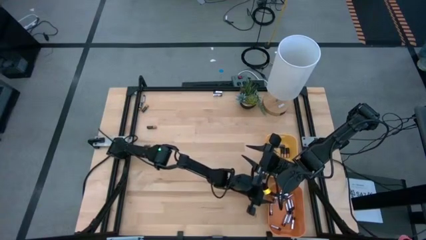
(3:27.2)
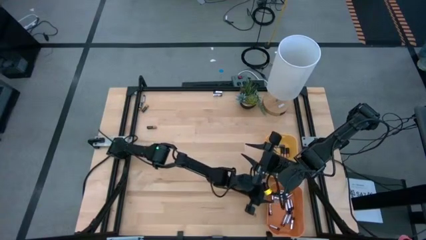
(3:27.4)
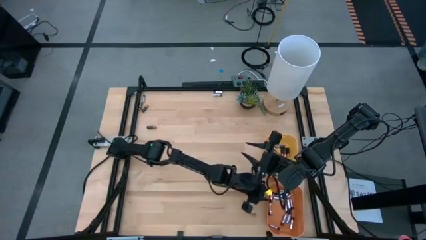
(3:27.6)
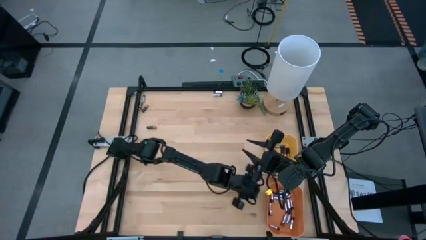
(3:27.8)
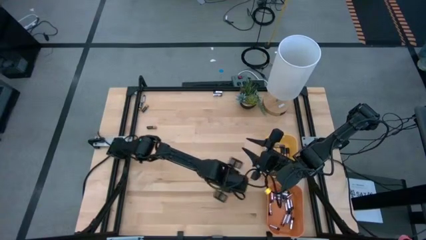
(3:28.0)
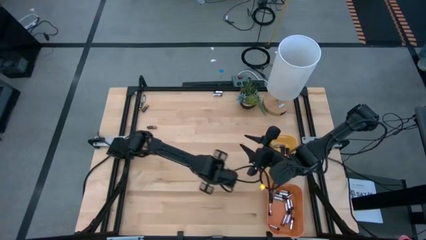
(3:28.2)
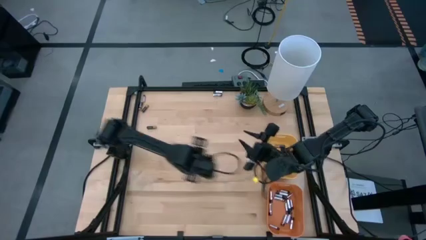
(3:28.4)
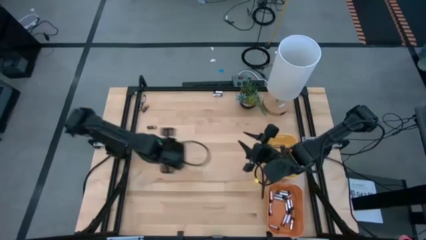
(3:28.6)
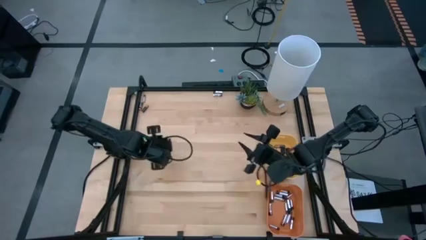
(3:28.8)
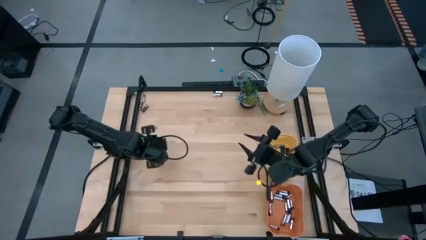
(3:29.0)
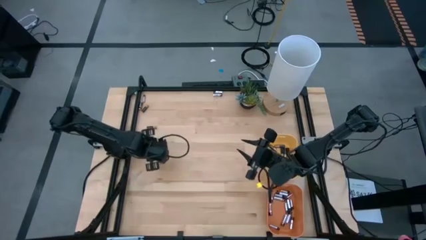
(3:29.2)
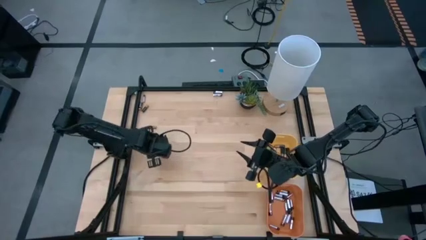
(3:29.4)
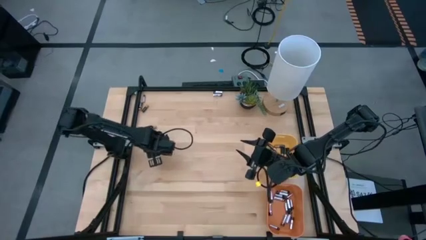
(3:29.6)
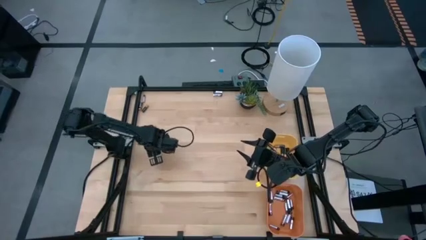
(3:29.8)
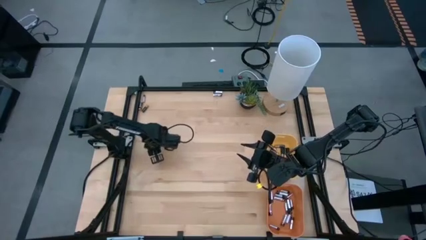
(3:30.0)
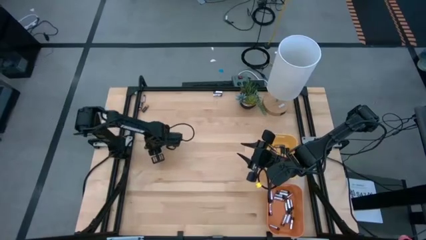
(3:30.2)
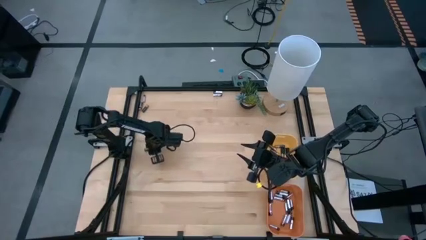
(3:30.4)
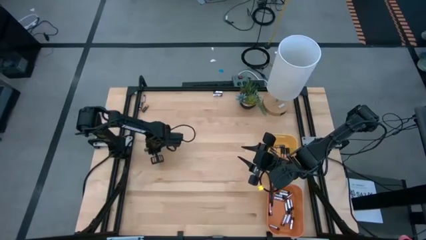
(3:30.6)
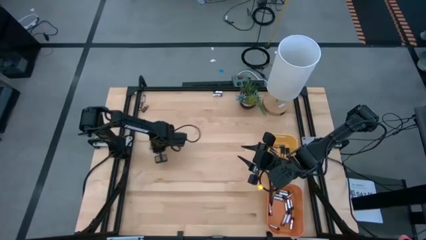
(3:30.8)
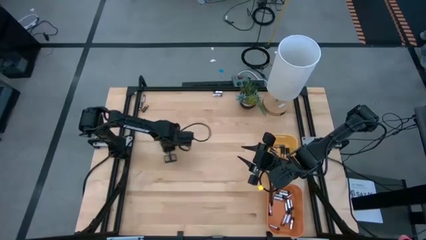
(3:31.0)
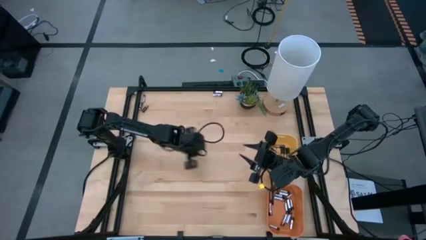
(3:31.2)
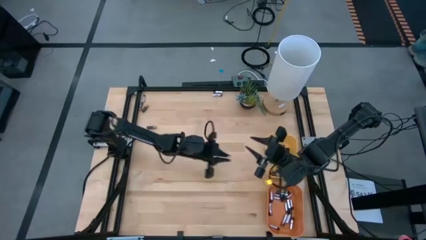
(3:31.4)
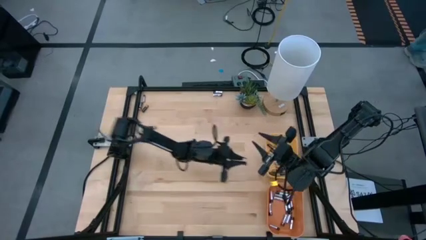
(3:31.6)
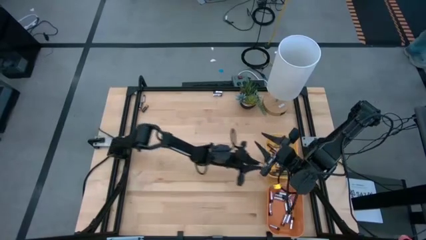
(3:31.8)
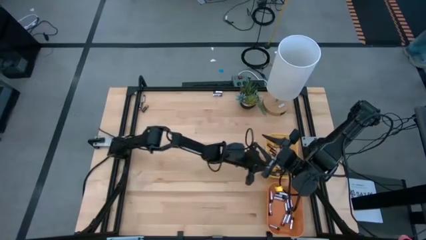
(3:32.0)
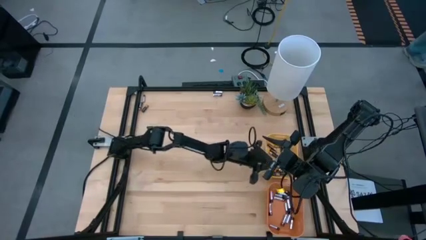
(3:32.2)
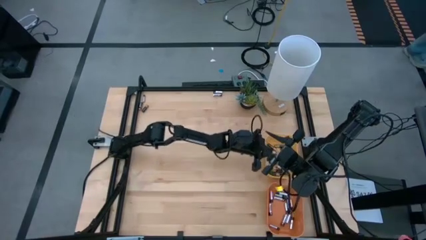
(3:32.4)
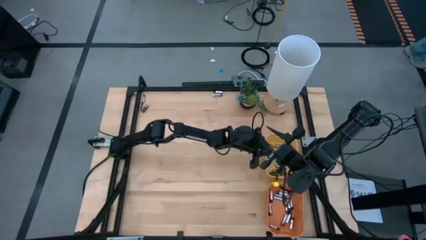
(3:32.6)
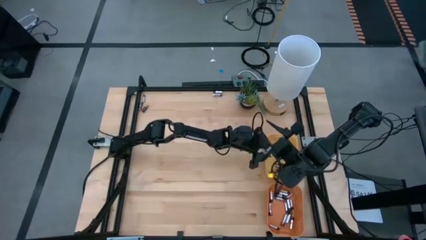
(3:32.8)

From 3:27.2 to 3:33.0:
Task: Sort batteries
Put the brown battery into the yellow bin

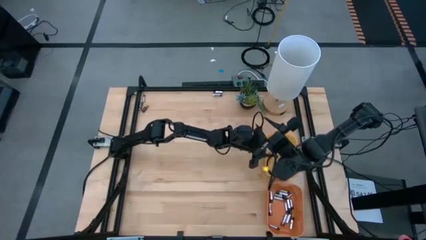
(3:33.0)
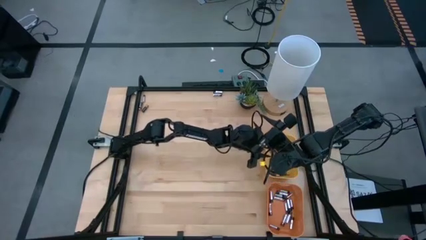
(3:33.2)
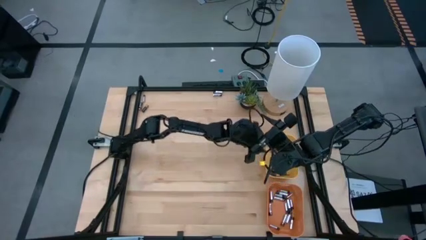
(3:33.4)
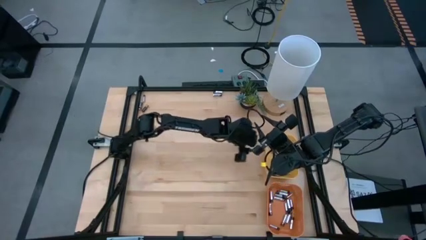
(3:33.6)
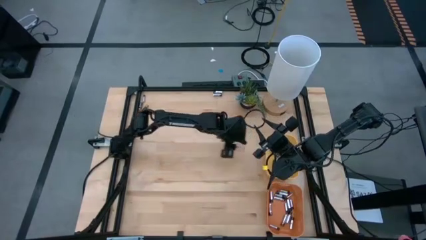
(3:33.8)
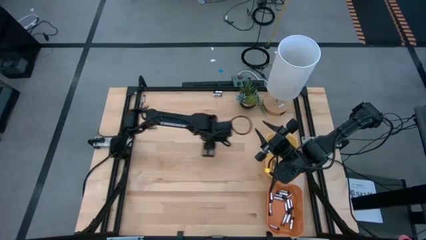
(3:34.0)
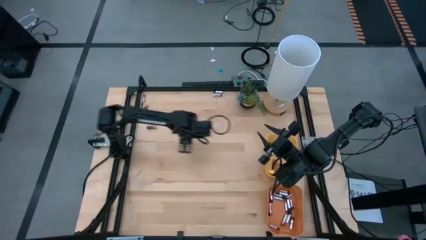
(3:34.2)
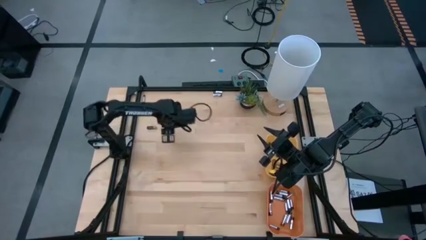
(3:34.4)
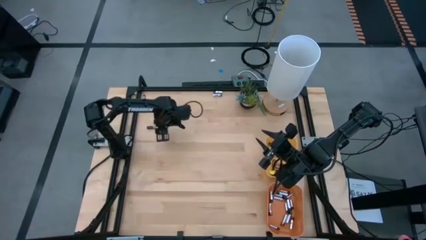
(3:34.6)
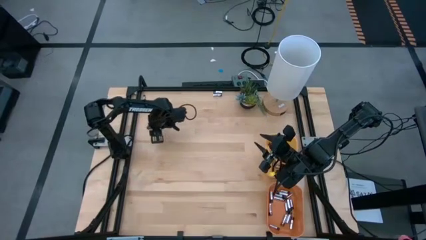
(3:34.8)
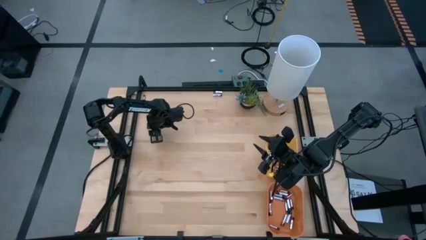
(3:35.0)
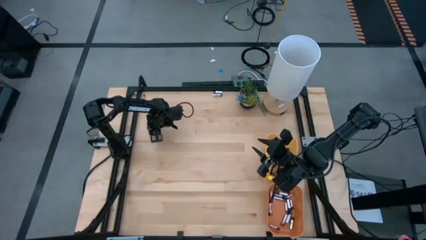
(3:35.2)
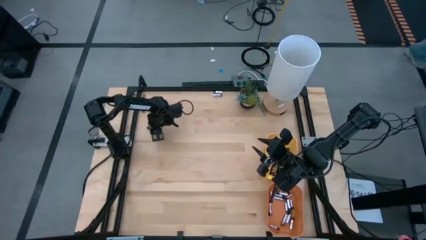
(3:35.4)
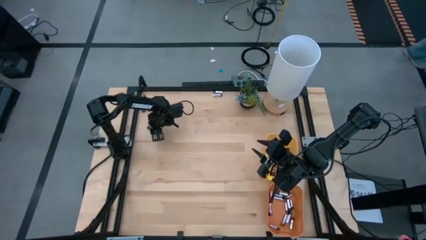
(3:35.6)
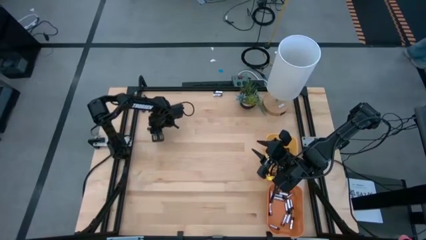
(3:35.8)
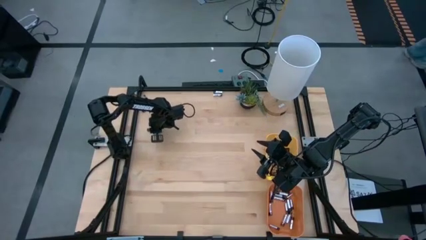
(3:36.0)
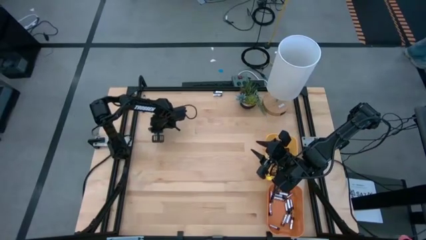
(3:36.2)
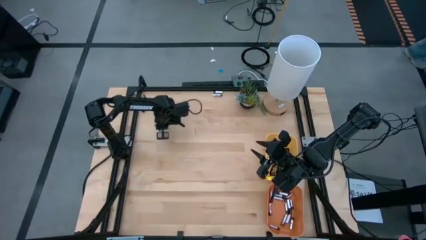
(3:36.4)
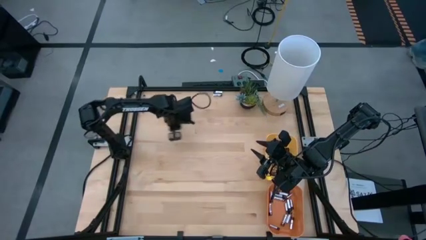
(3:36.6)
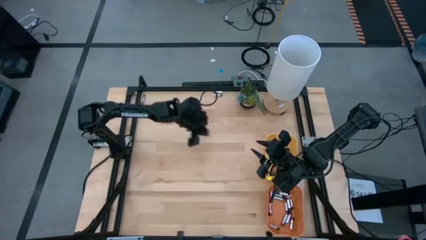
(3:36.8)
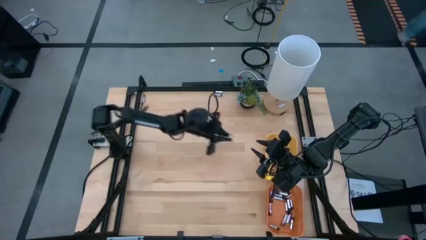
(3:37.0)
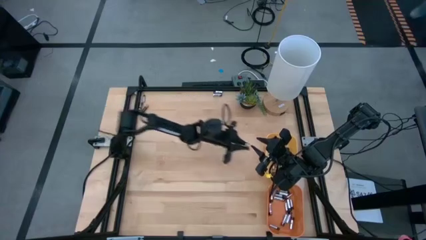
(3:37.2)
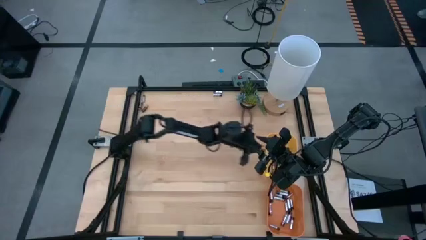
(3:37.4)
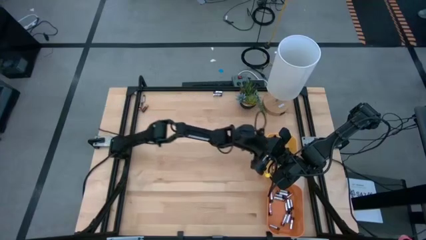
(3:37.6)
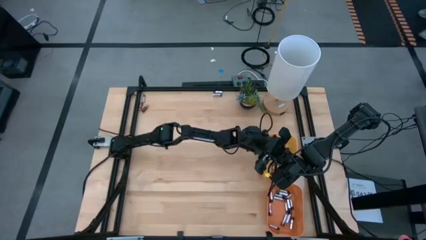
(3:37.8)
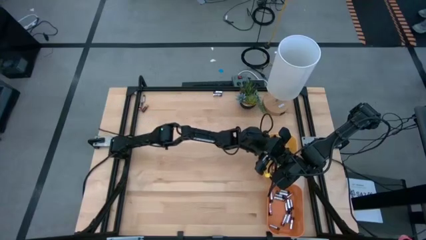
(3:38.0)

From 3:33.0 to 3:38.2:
Put the brown battery into the yellow bin

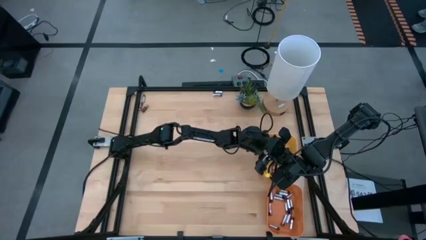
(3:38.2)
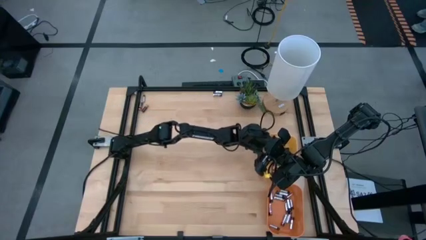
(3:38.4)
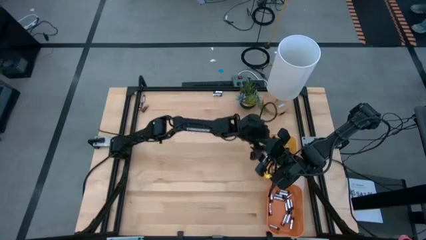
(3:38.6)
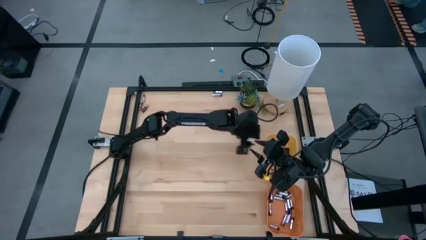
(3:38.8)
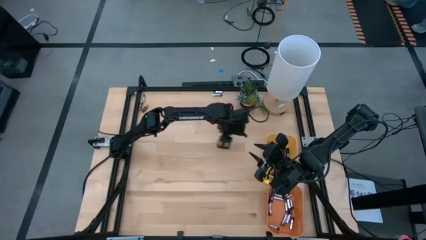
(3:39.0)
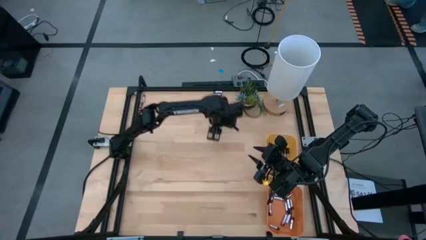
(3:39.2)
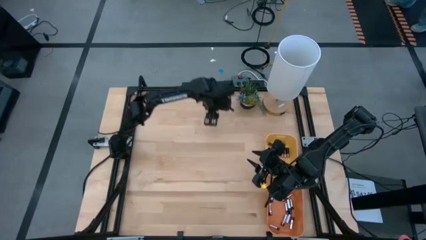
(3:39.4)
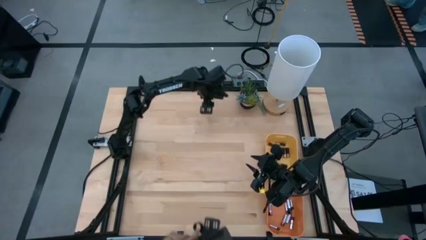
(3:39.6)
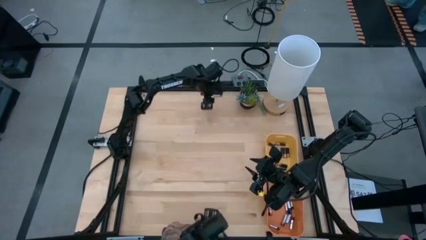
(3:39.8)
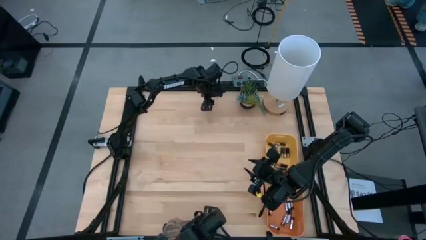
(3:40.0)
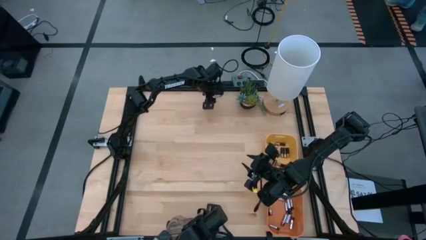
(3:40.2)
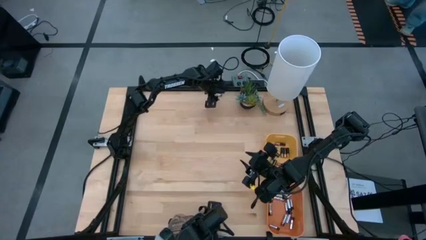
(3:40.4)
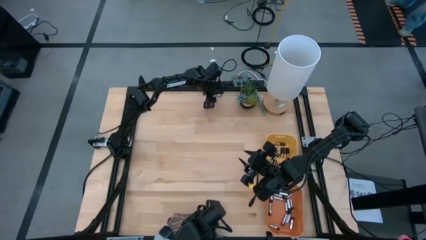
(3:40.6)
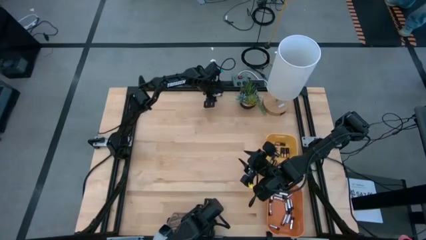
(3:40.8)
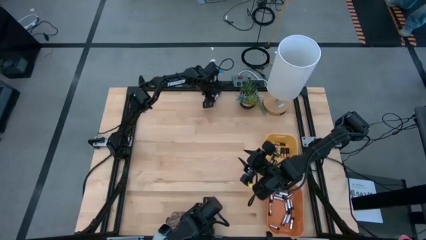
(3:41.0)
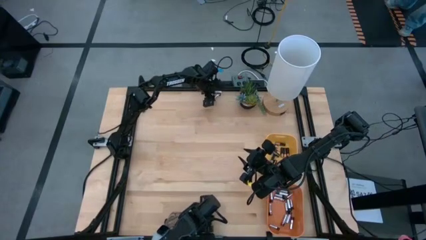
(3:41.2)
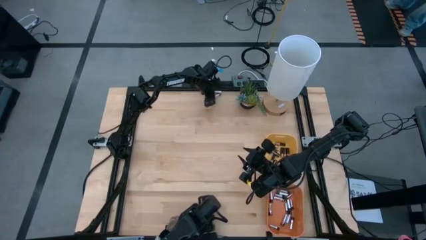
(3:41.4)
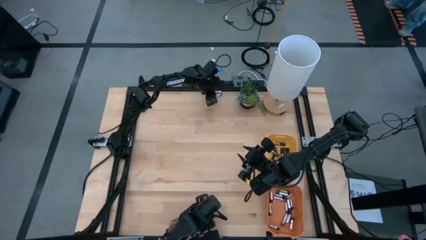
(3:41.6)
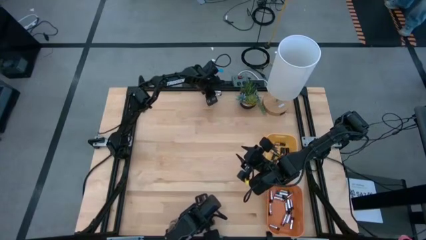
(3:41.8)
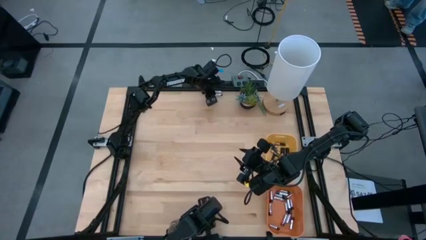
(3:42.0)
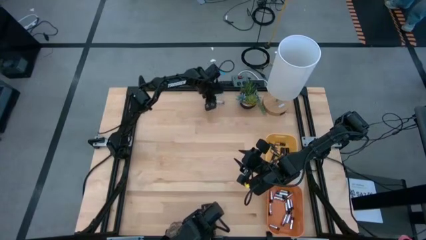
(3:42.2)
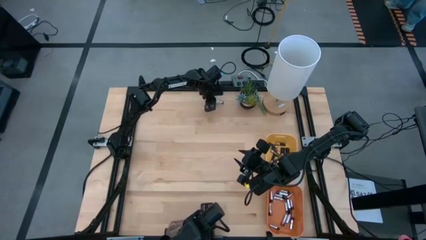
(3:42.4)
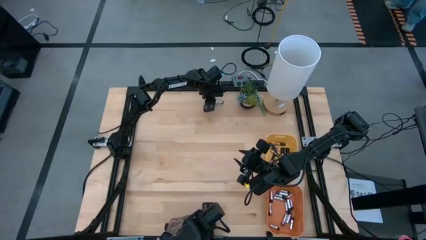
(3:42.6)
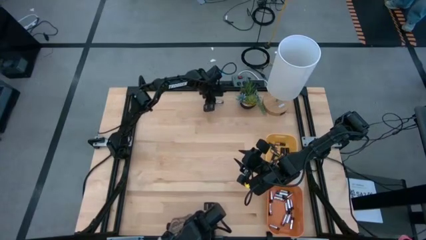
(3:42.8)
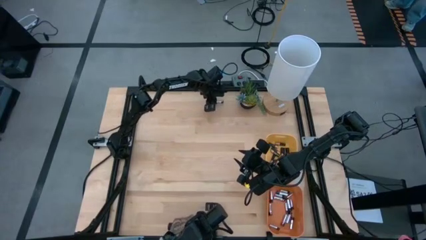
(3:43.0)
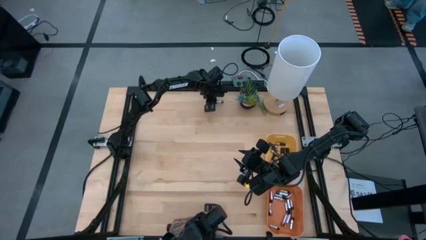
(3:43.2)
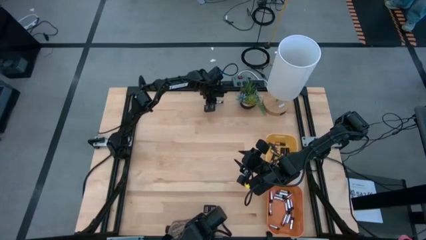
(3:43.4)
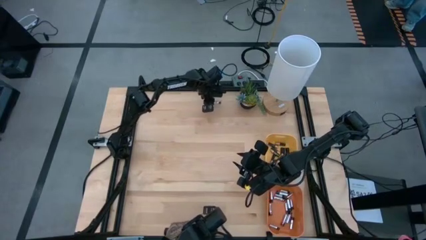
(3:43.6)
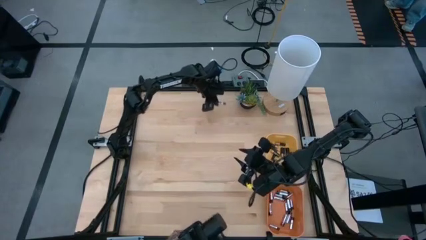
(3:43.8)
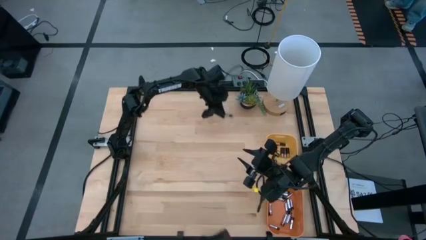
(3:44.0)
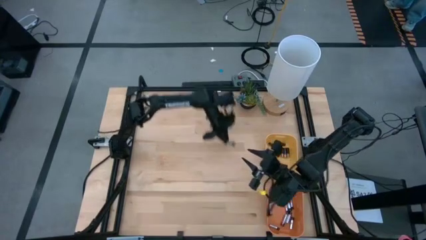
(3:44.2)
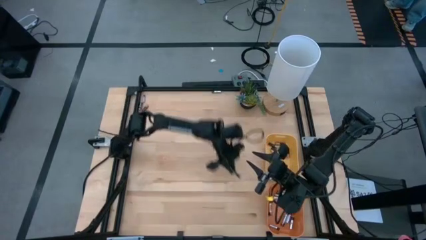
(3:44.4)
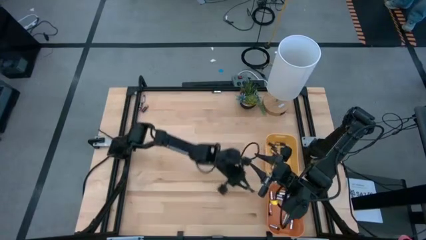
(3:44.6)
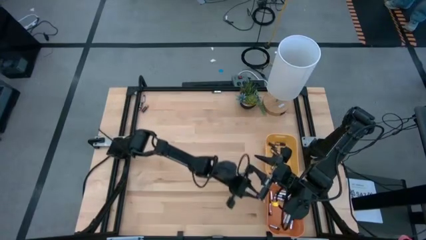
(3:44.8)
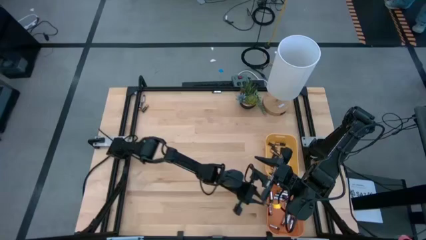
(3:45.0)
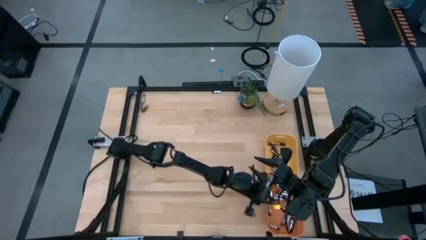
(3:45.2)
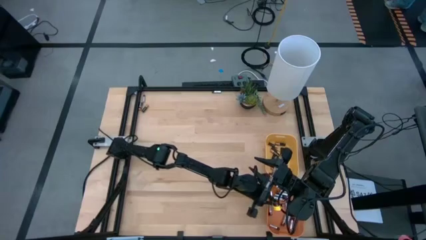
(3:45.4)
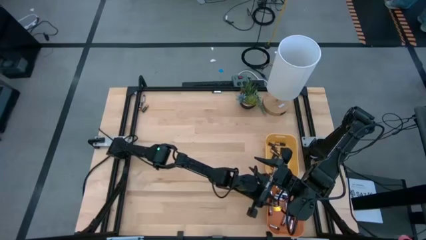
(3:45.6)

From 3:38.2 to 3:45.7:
Put the black battery into the orange bin
